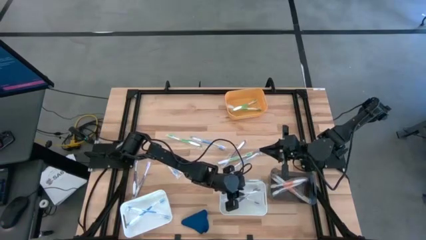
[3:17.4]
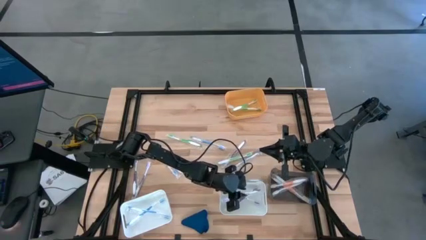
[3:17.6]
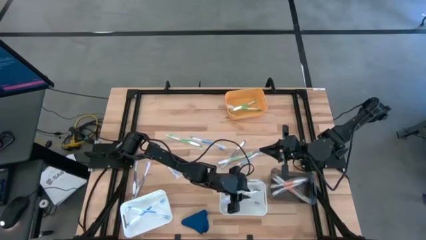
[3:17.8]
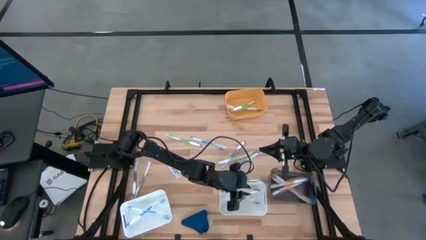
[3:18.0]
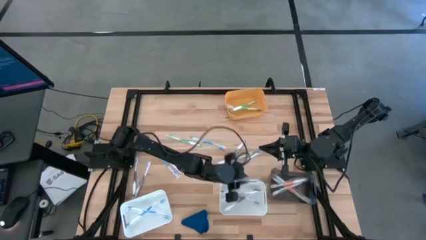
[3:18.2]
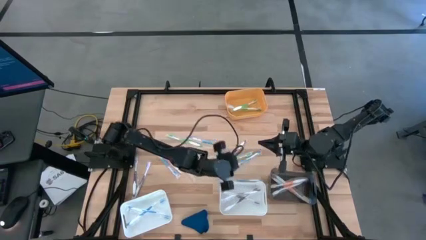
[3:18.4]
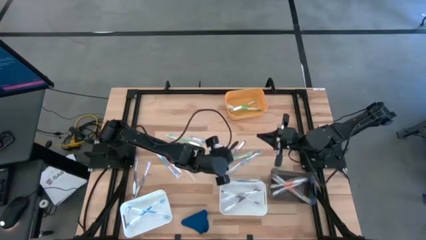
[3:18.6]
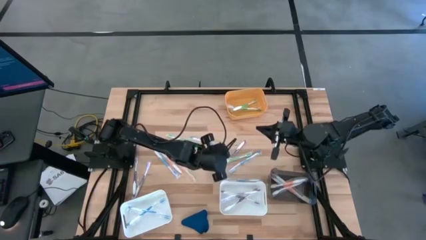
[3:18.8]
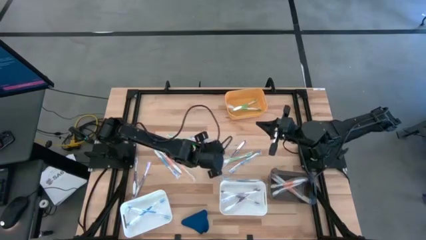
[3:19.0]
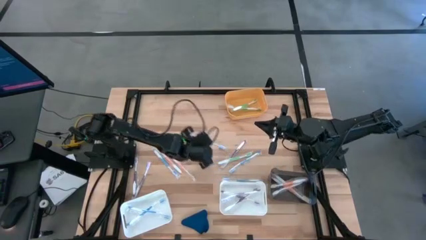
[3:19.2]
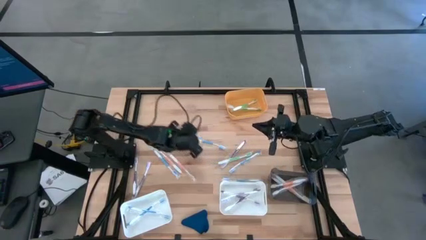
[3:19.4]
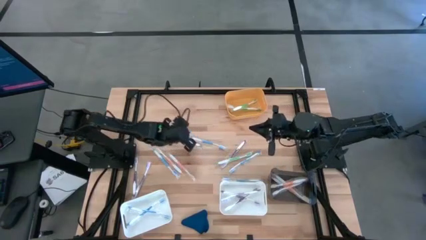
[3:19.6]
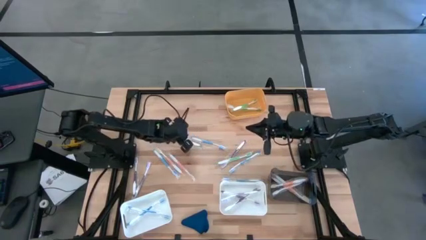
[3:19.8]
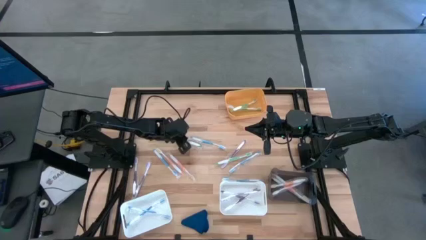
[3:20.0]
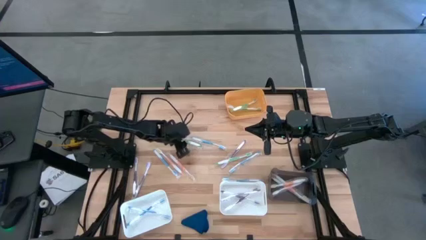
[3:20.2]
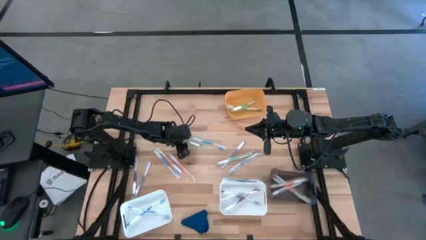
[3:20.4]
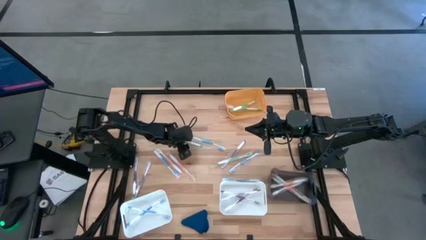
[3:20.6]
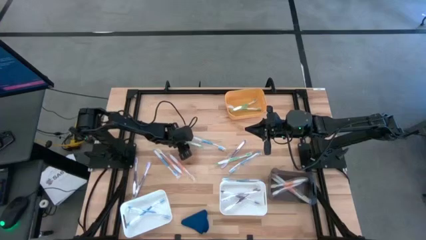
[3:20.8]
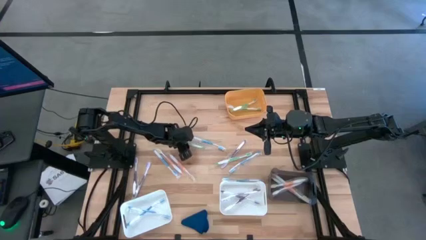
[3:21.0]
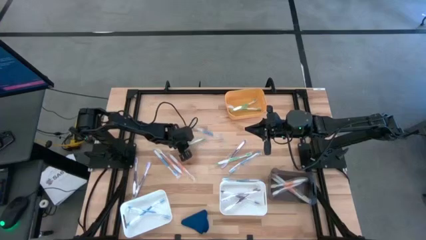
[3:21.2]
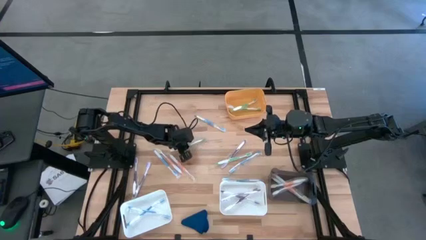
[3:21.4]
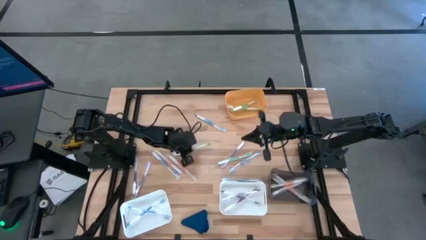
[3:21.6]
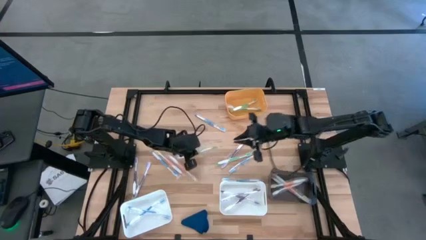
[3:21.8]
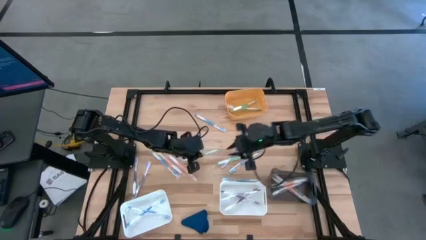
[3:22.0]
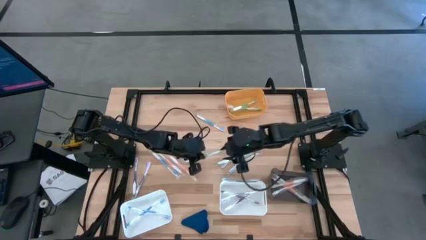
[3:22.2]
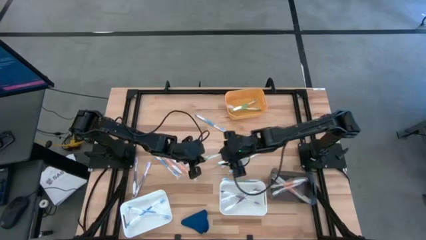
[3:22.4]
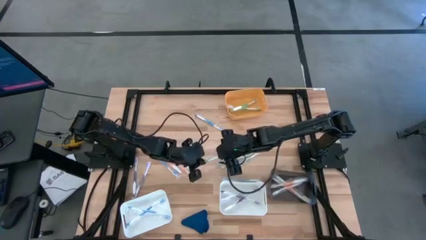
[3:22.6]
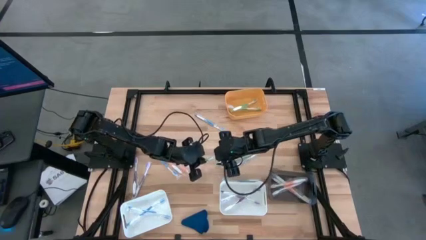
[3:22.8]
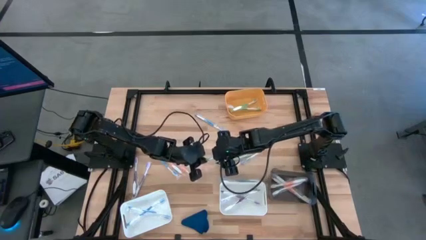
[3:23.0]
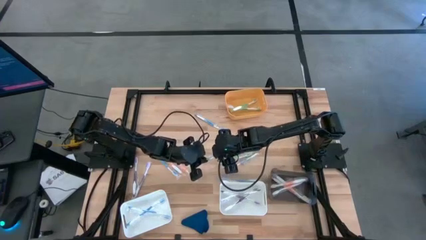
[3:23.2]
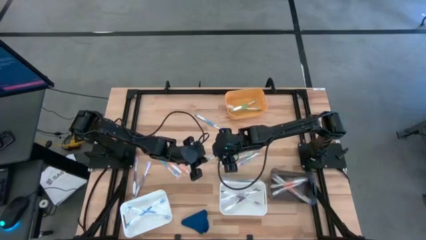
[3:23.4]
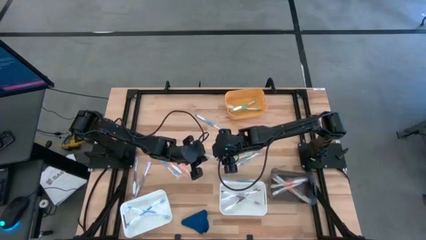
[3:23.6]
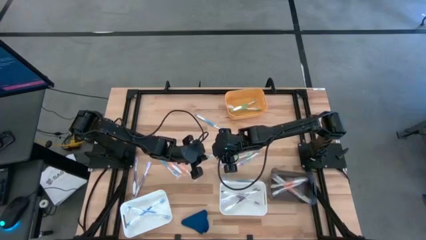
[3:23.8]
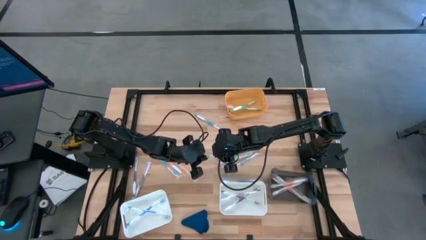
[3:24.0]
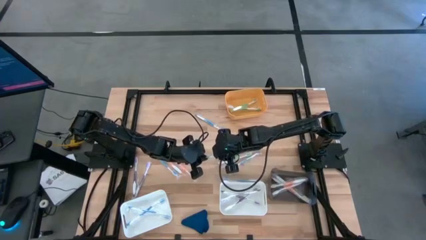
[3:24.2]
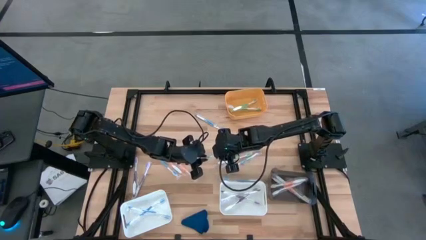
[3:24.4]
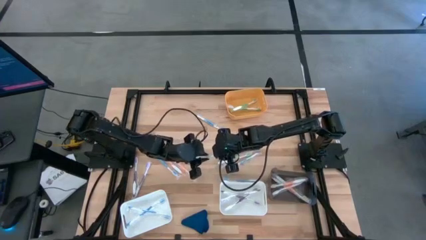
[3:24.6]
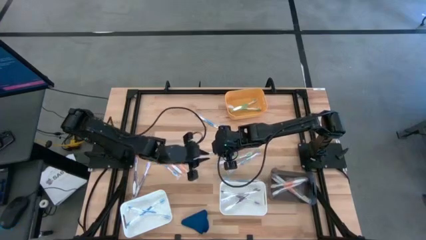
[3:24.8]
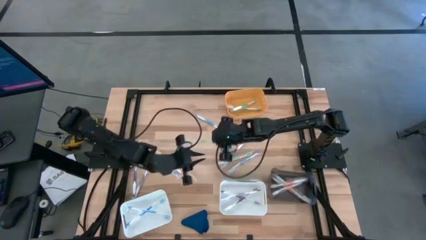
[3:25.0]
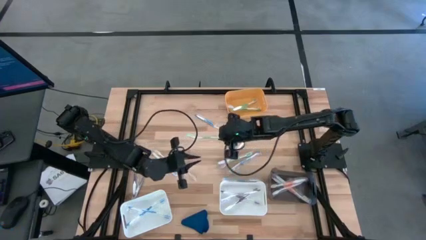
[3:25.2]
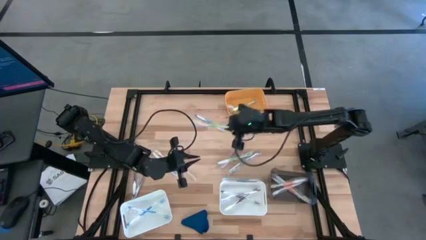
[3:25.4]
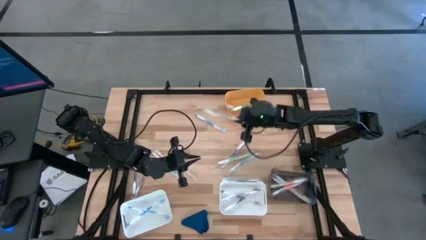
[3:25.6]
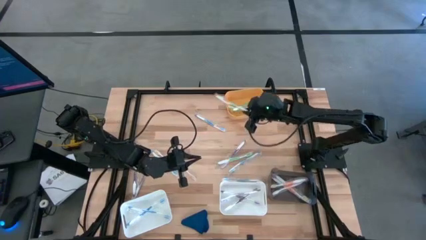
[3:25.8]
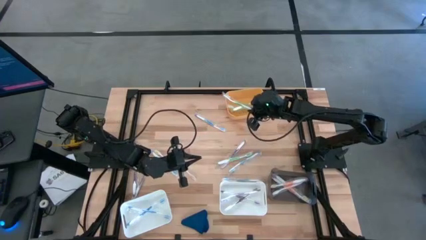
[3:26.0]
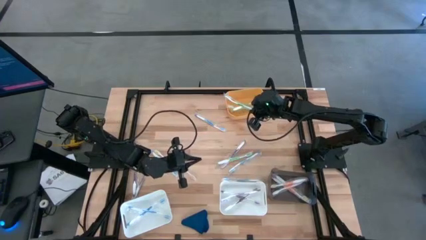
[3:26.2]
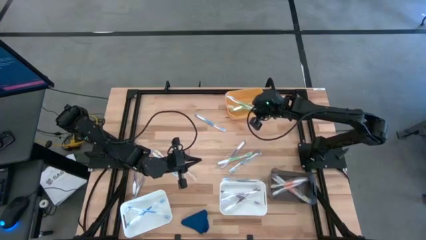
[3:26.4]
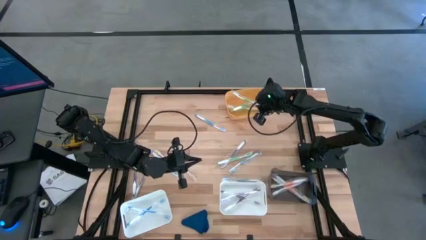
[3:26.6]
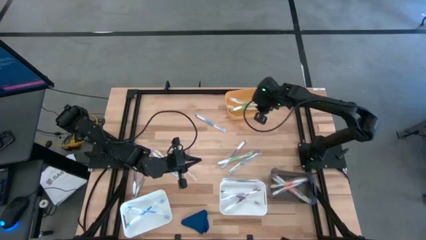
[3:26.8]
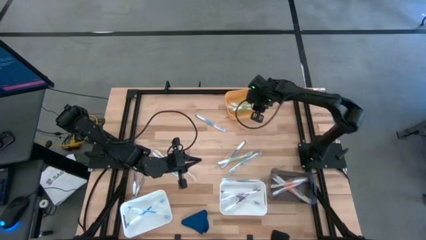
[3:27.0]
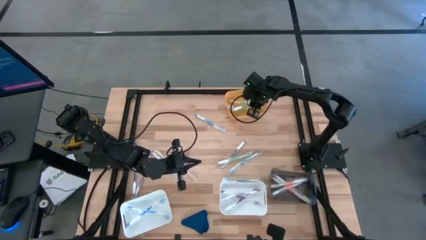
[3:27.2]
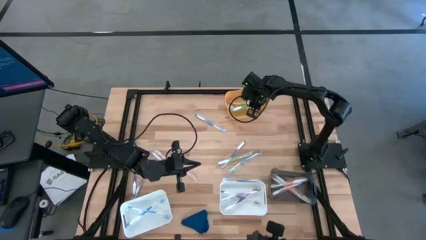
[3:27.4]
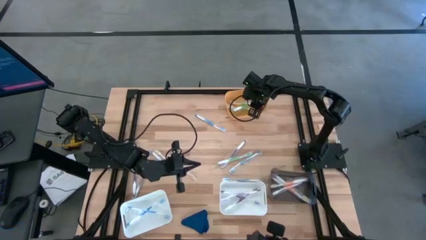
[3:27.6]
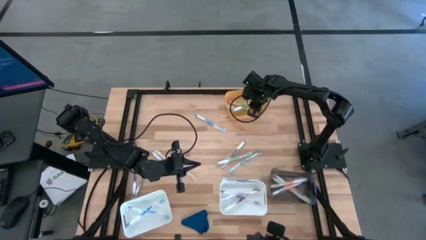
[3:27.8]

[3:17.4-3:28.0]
Task: Pick & Place Toothbrushes
Put the green toothbrush into the yellow bin

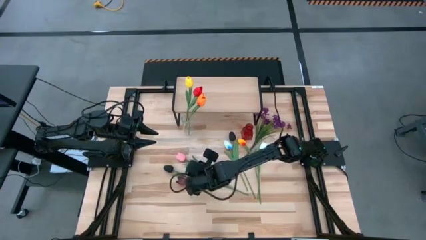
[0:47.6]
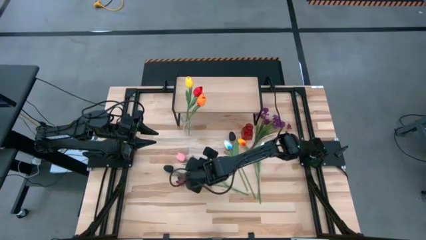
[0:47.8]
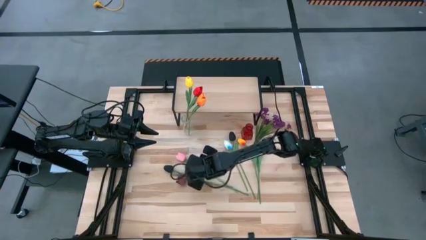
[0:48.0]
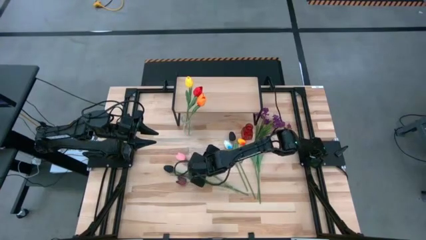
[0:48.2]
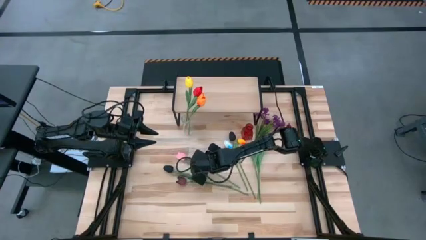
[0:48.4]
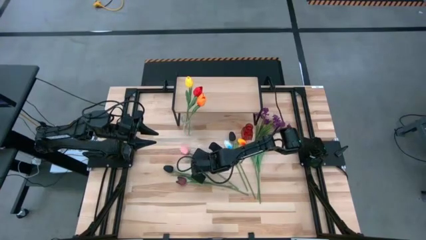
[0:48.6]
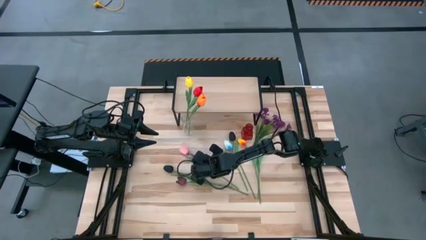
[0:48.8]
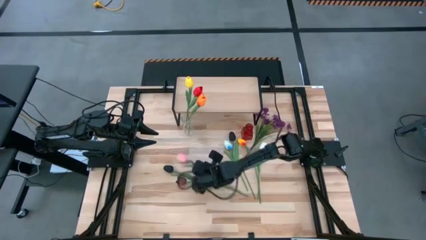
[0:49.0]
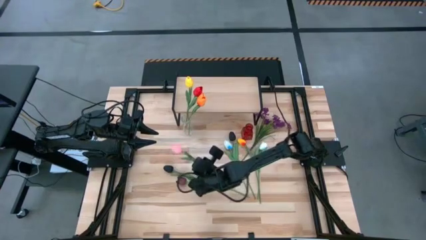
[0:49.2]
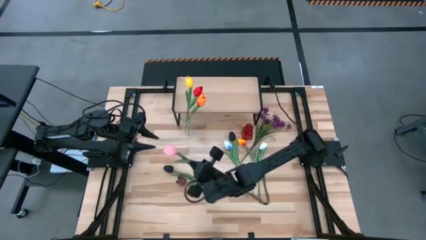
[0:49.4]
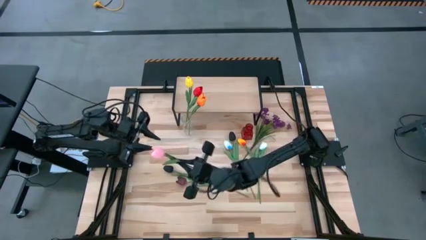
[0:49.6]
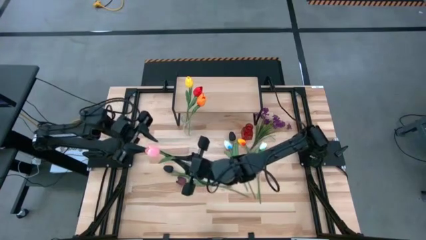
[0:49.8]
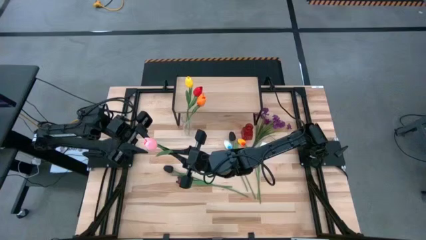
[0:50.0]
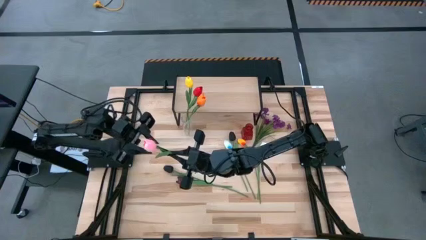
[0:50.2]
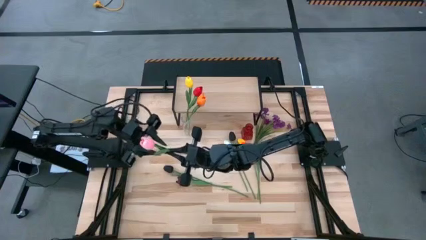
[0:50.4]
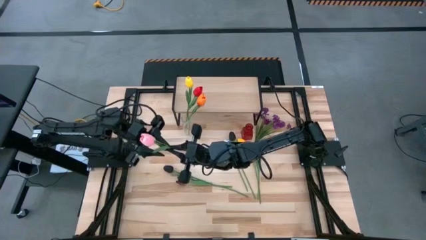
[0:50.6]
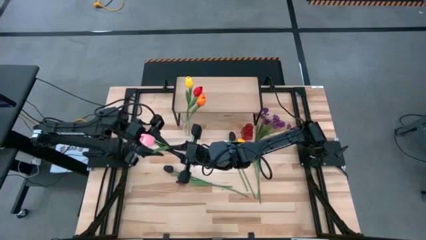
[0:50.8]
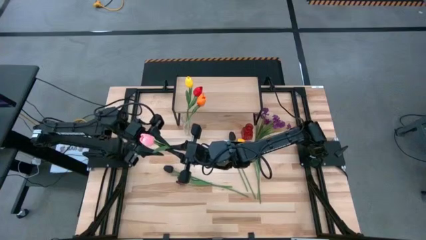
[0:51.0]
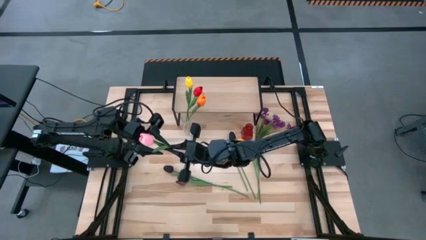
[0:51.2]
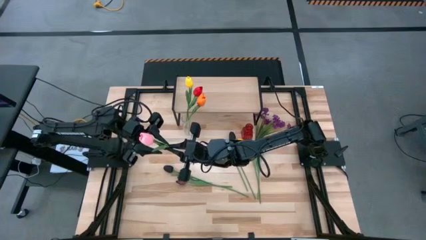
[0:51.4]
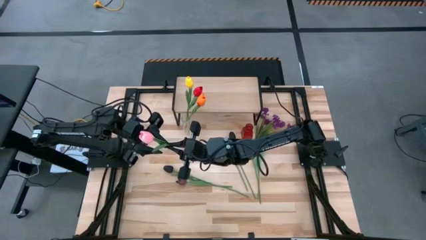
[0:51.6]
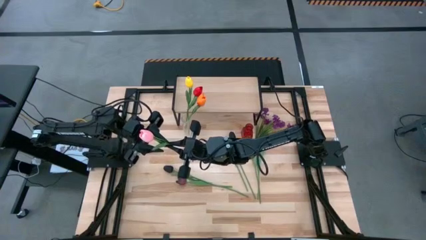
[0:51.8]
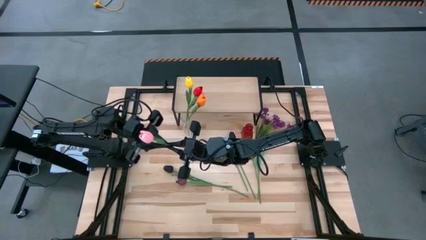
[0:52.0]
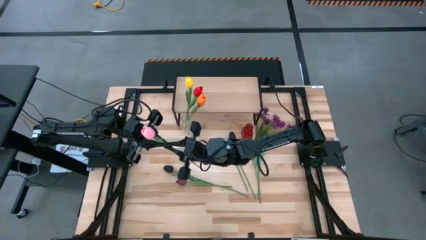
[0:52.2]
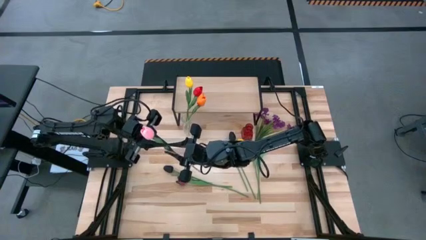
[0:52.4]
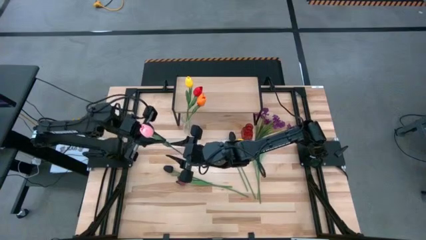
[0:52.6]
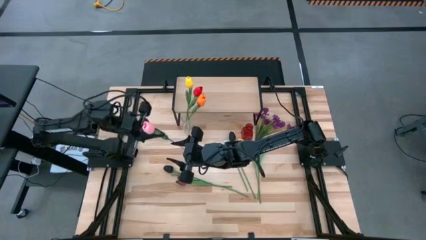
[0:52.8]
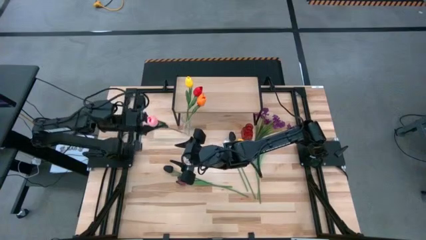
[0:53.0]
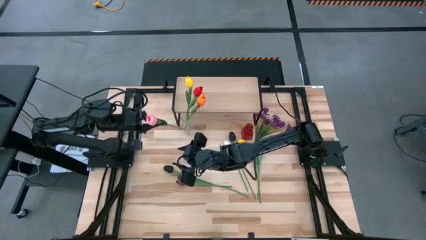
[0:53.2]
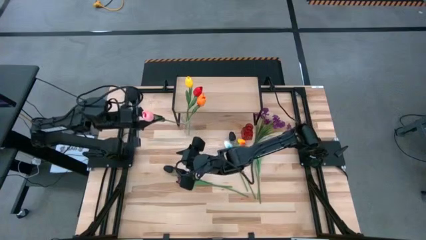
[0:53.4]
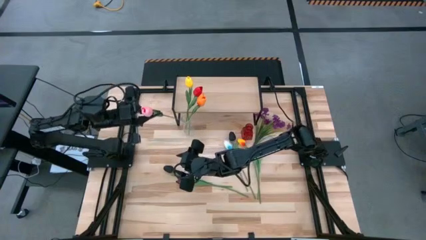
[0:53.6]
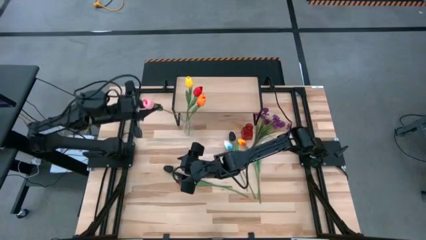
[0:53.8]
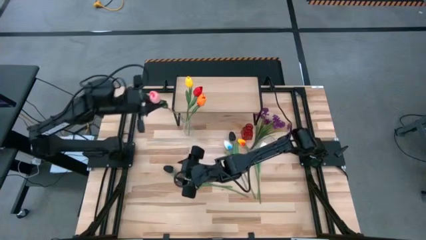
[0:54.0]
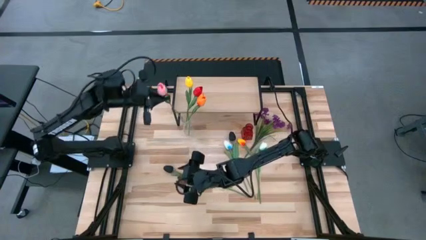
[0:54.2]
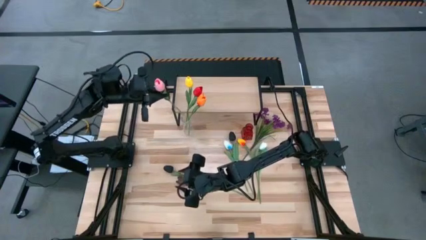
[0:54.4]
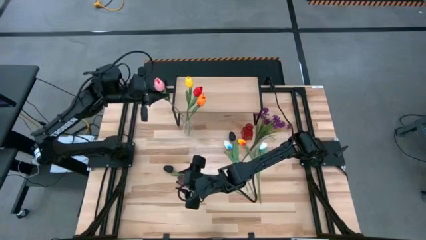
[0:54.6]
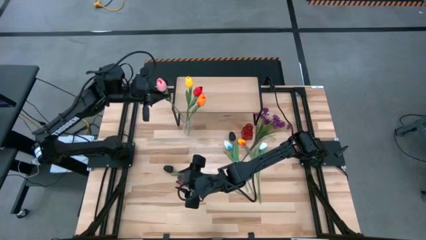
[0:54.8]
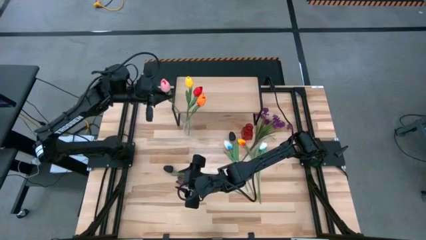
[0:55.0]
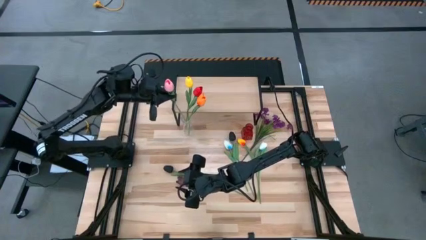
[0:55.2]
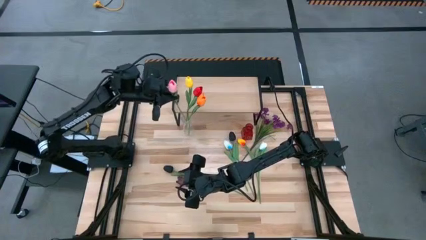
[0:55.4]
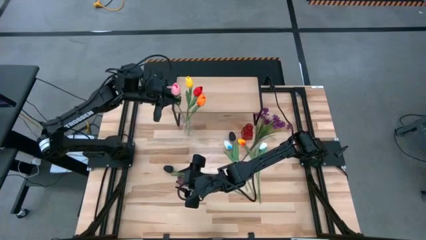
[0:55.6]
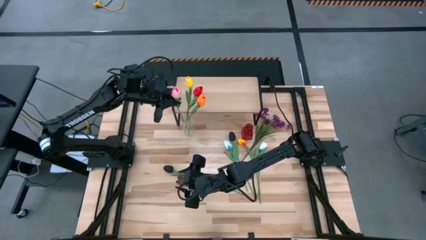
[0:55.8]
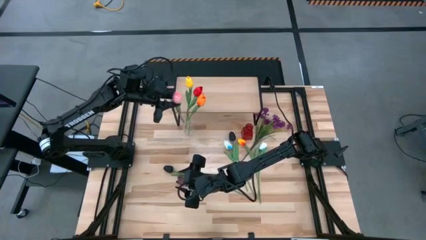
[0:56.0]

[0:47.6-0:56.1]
Task: Pick and place flowers into a vace then onto a shelf
Put the pink flower into the transparent vase
